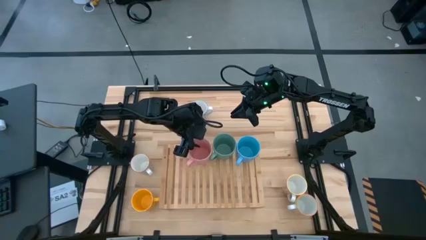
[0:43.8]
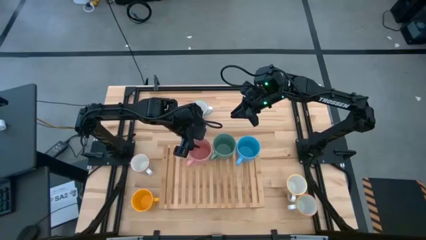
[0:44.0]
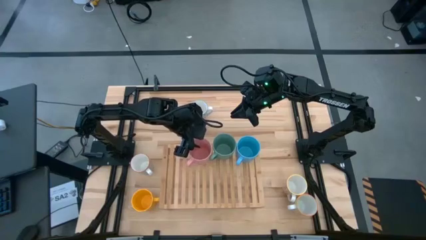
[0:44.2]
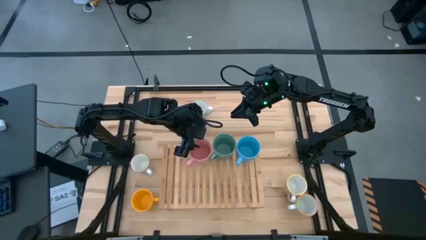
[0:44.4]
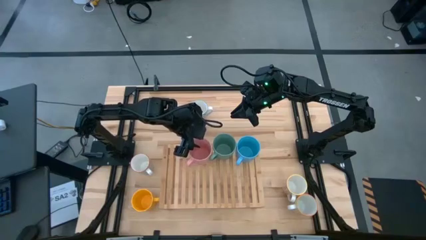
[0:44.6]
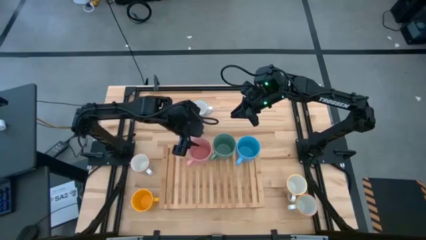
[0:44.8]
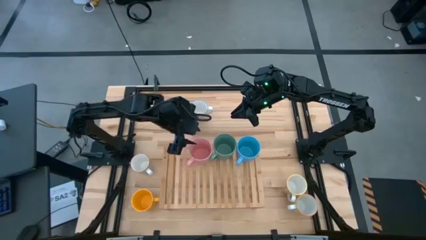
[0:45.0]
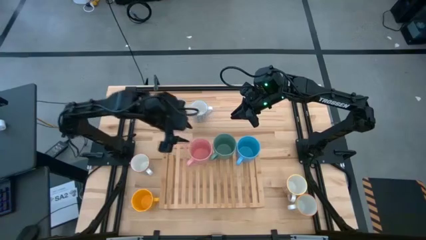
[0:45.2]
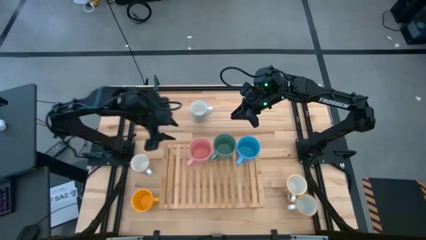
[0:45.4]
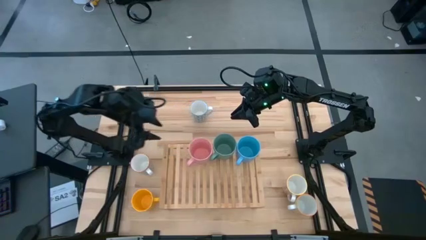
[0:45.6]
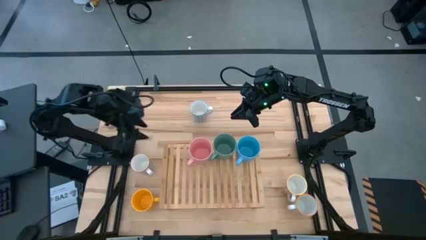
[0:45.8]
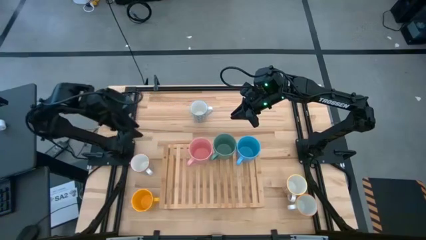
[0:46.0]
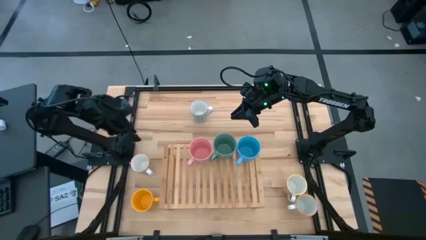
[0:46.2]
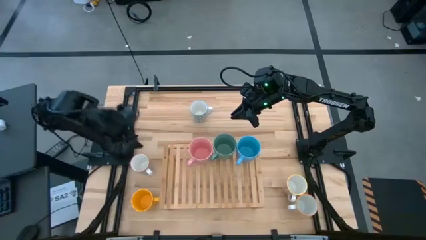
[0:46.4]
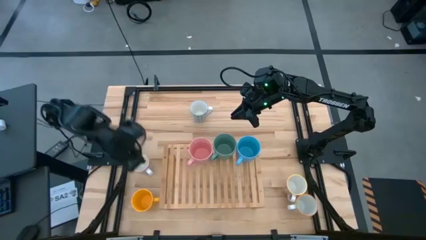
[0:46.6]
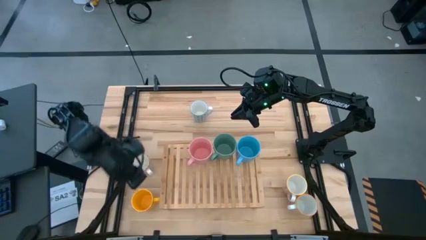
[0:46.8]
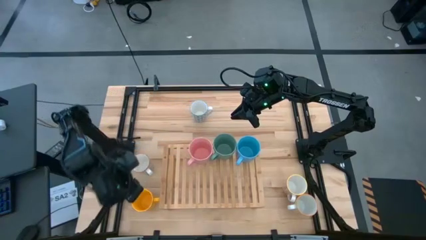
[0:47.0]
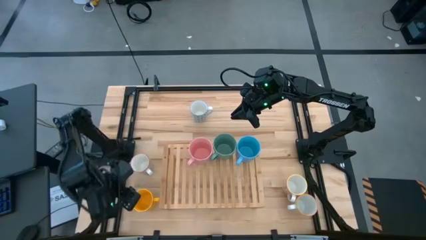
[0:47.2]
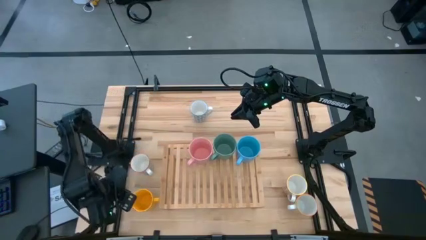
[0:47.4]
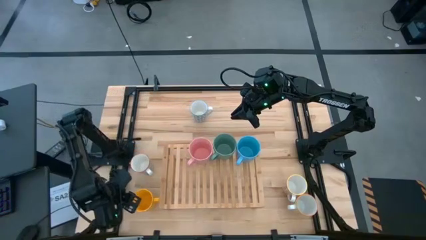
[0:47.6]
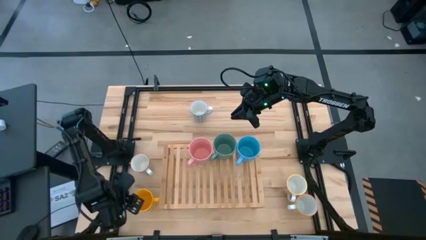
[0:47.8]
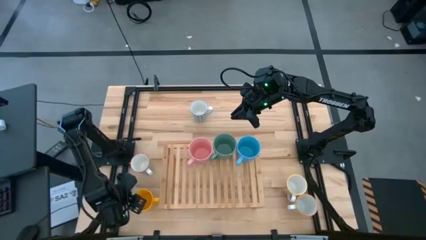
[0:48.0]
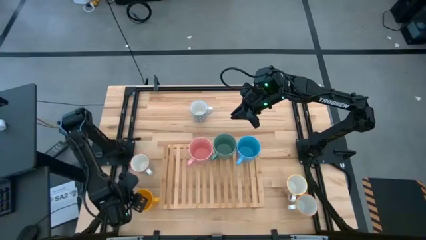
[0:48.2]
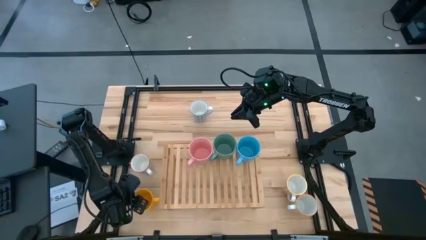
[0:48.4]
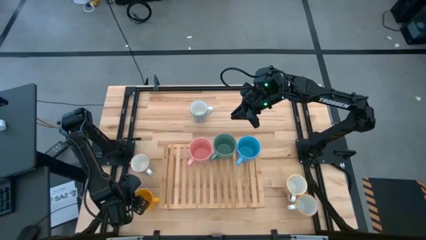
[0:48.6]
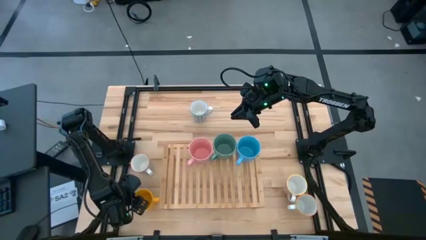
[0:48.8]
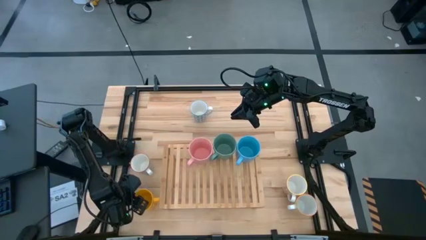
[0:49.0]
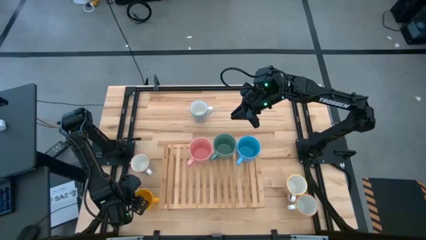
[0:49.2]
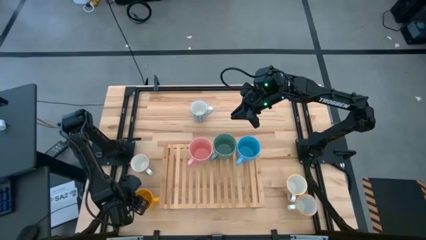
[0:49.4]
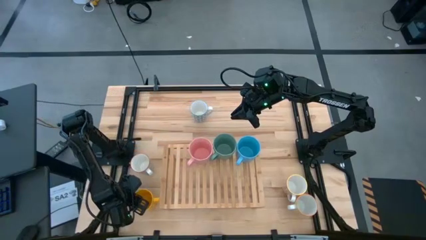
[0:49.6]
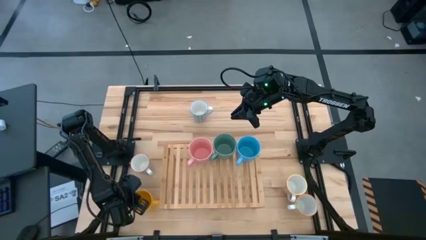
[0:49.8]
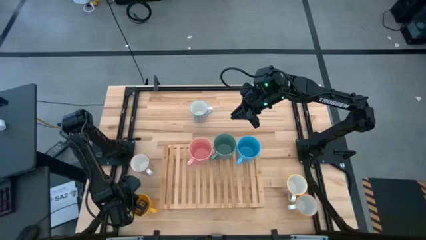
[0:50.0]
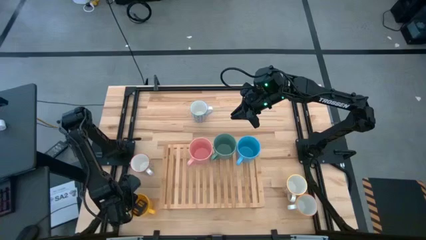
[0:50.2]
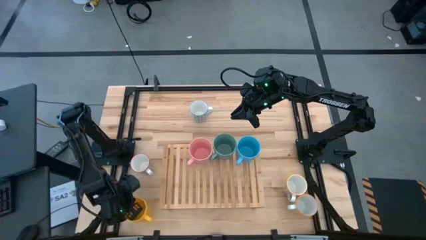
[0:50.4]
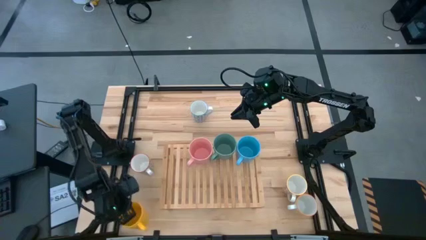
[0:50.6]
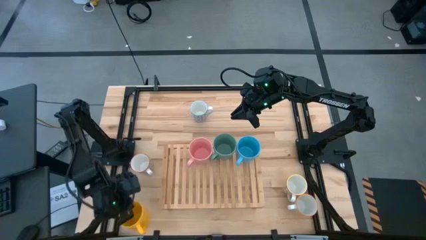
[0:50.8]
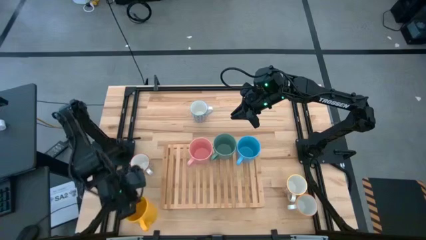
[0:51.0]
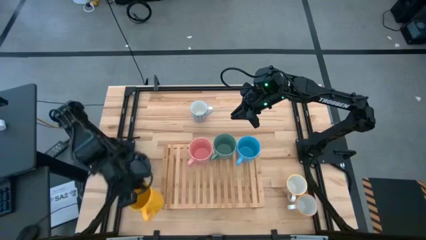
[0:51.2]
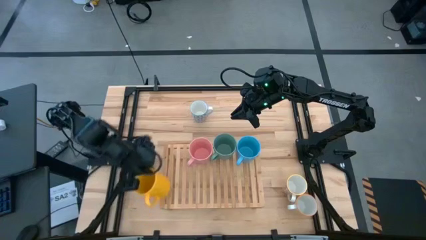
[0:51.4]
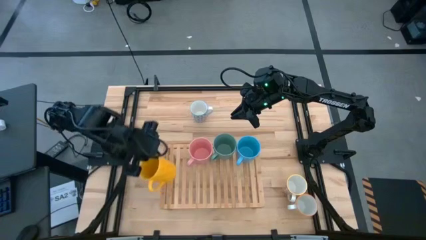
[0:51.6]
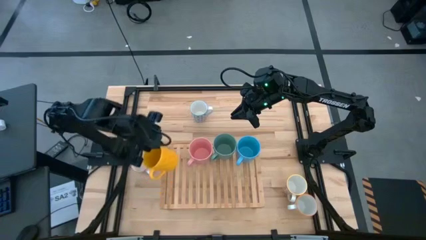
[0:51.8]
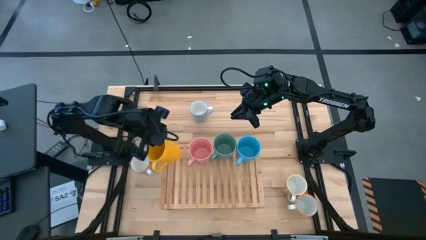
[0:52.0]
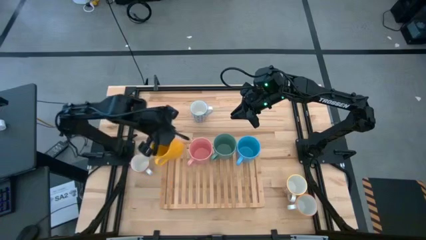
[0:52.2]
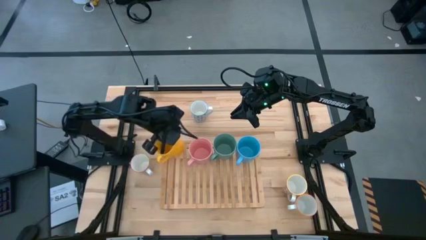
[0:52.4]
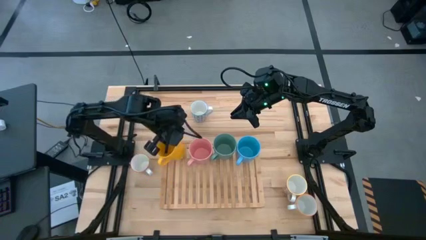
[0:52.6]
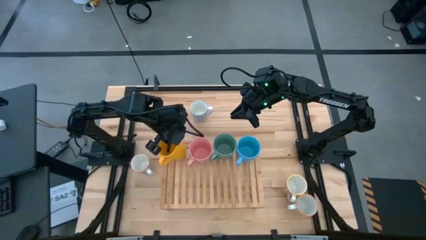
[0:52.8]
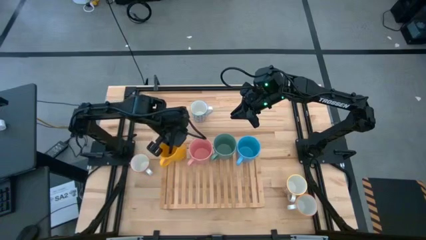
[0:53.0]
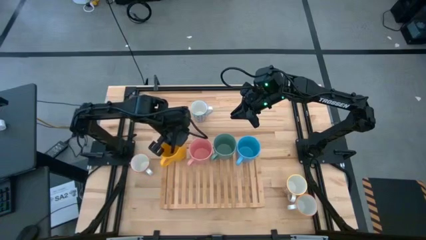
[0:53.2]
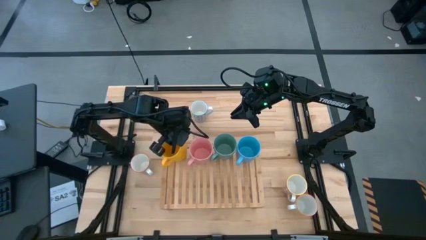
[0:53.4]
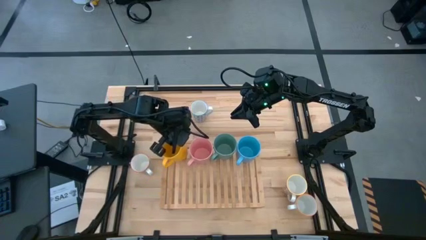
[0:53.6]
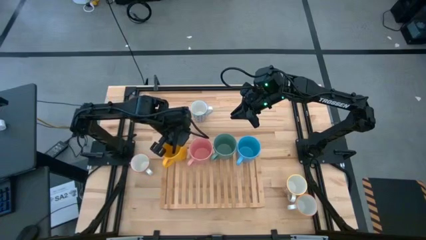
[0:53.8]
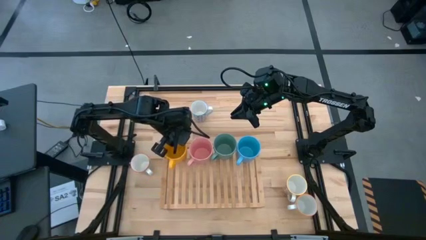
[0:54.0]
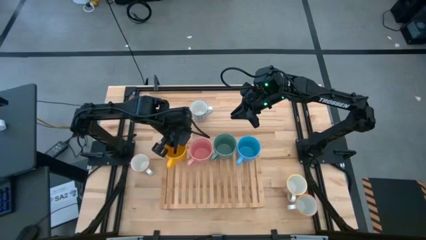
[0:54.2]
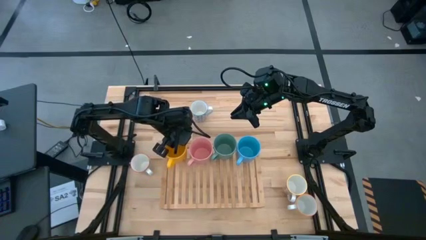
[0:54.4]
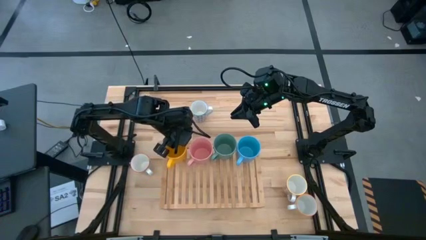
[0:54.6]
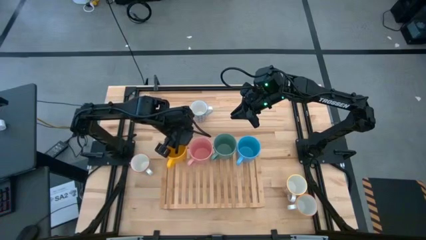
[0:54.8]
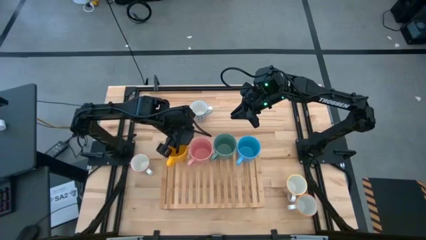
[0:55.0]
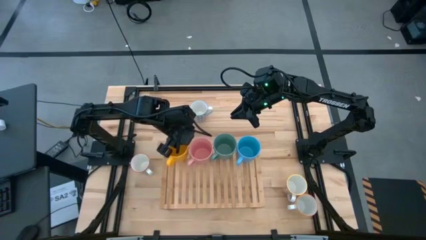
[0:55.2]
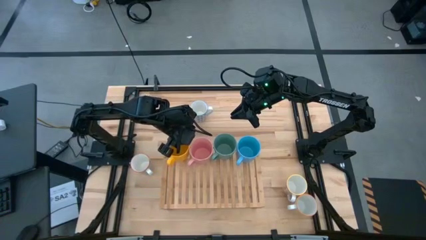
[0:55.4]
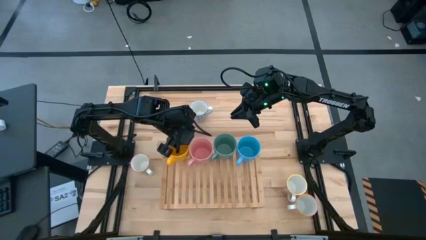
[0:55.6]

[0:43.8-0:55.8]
Task: Place coffee mugs
Put the yellow mug on the shelf
